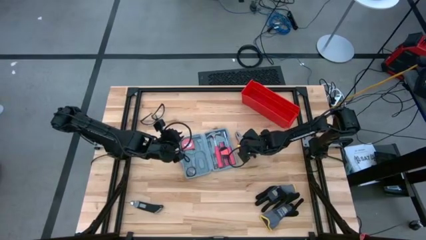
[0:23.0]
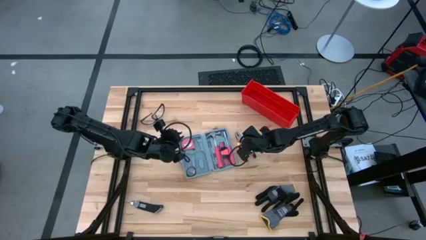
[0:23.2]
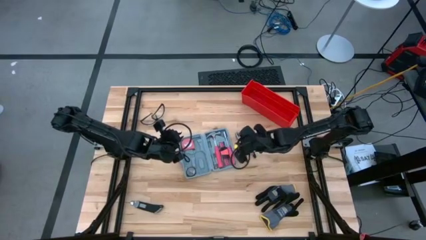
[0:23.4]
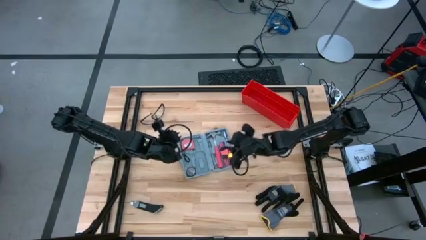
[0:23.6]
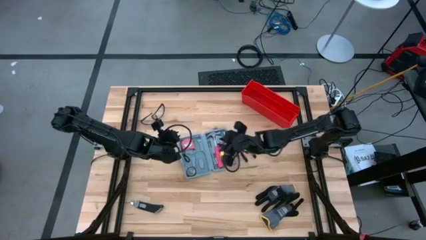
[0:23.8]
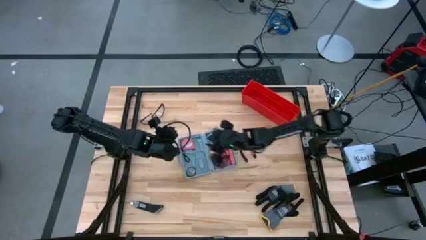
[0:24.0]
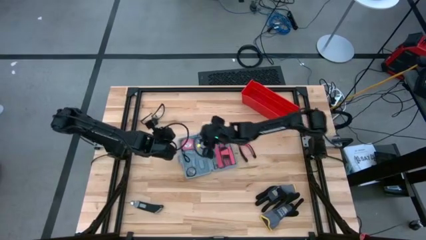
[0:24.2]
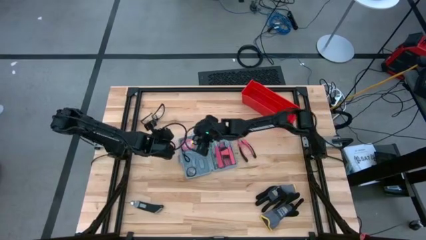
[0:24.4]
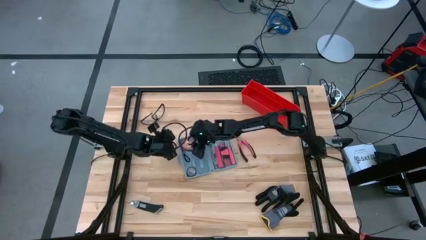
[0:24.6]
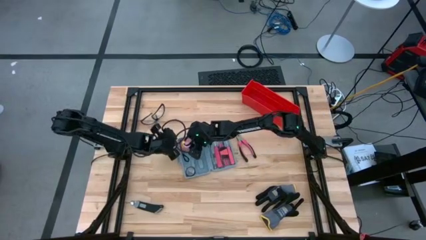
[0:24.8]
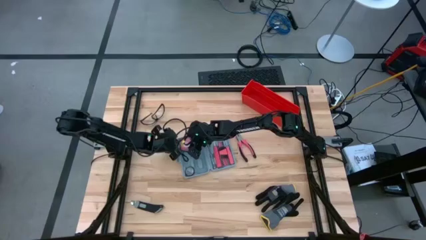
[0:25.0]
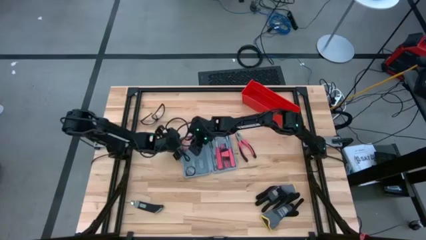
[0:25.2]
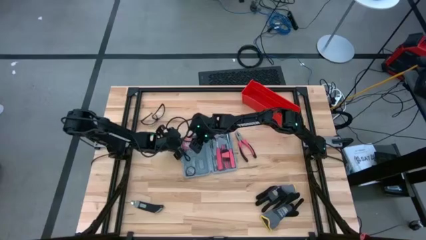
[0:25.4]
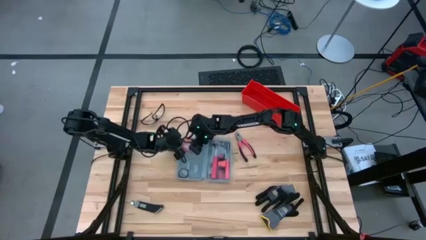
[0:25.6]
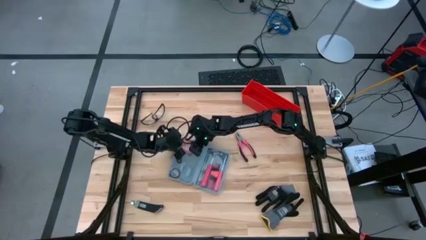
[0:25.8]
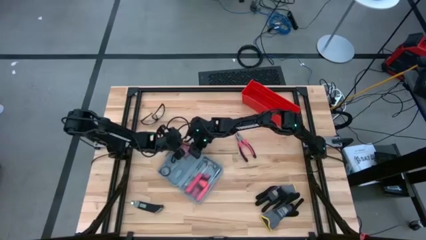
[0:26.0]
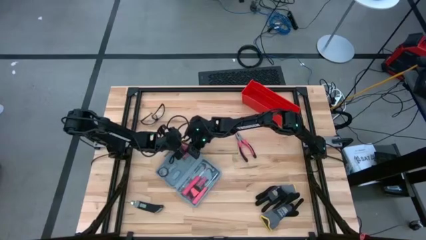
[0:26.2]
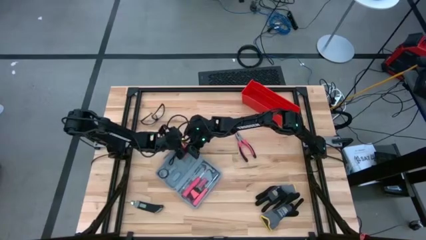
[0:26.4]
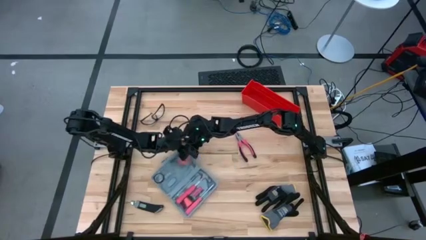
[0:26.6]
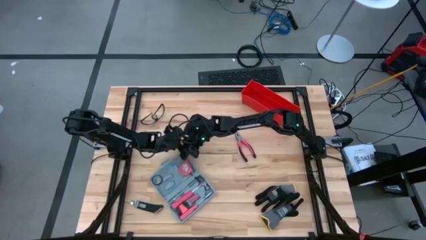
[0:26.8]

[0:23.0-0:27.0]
Task: prefit tool cases
Remove the tape measure from the toolbox

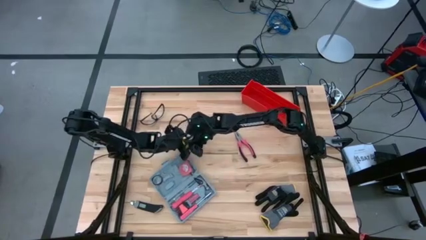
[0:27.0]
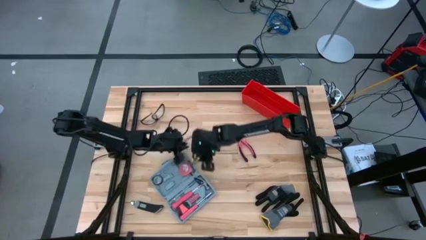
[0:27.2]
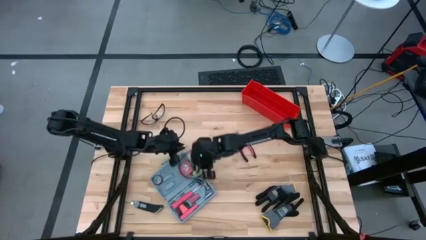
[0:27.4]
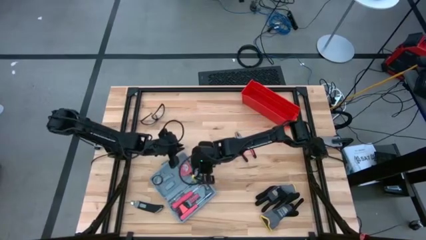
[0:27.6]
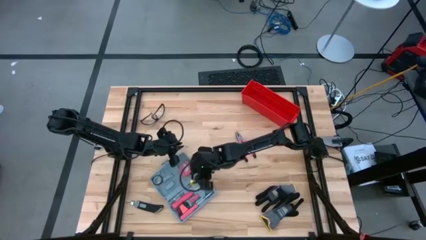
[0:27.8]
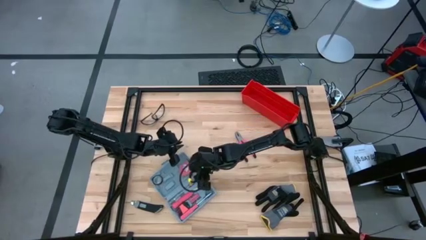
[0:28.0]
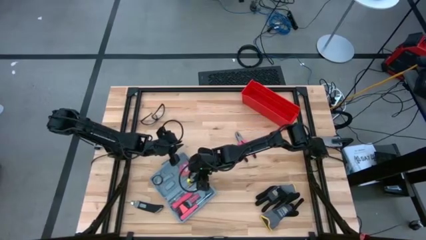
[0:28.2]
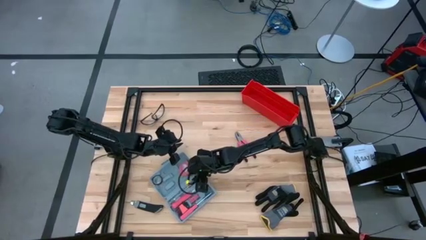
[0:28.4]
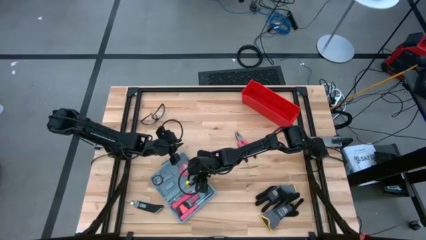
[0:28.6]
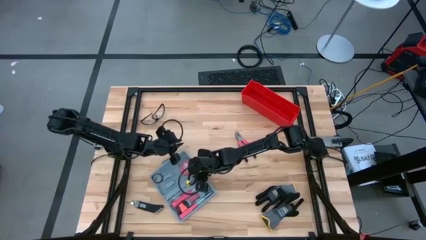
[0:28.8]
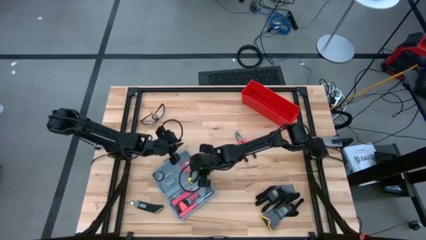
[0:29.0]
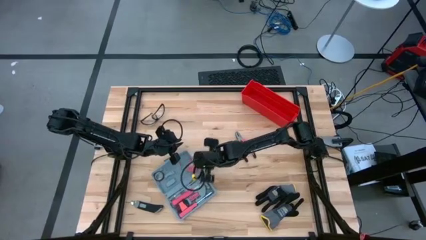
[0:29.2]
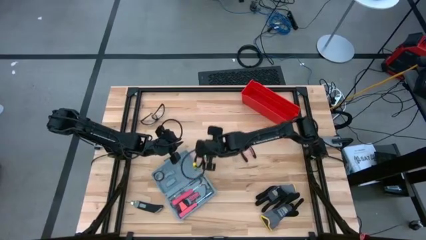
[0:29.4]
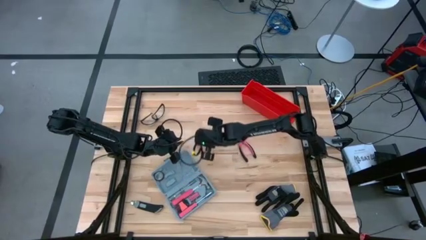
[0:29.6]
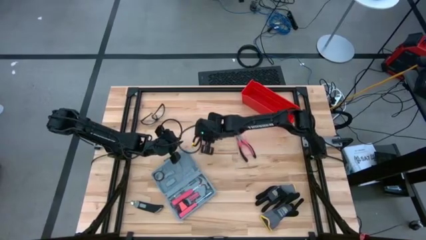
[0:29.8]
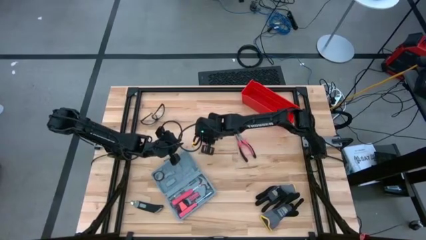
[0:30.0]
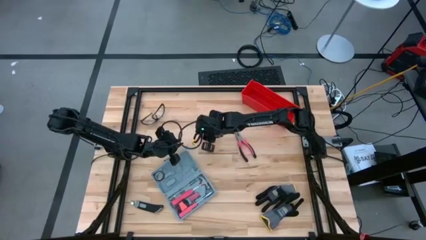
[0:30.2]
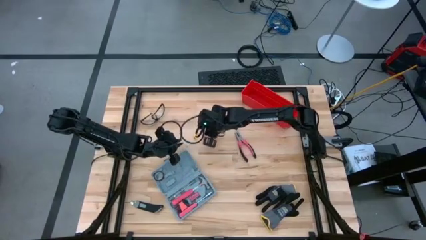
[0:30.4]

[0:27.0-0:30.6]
Remove the tape measure from the toolbox

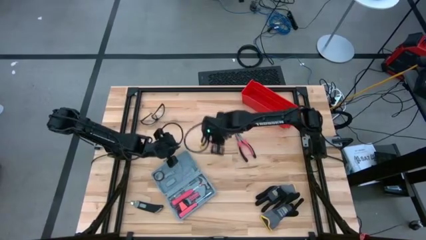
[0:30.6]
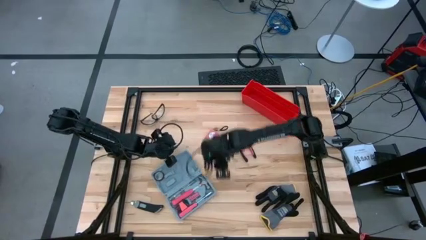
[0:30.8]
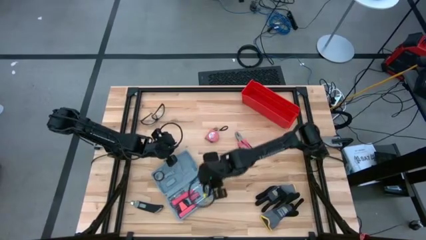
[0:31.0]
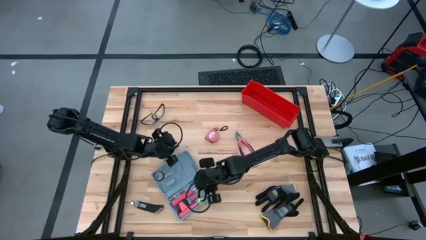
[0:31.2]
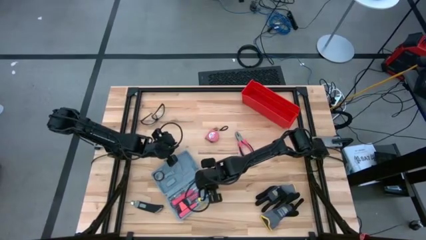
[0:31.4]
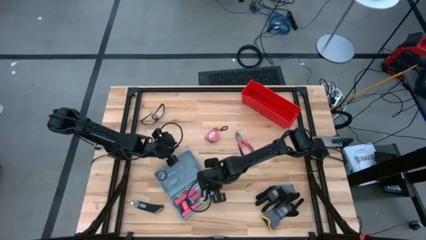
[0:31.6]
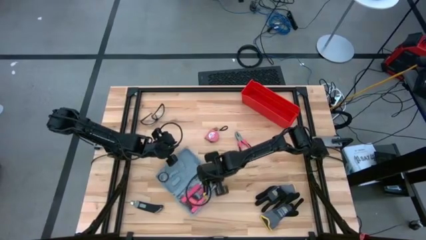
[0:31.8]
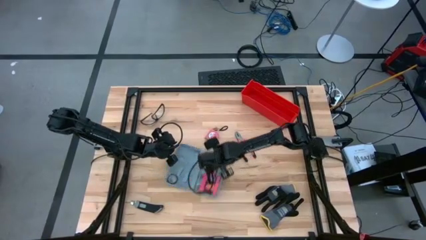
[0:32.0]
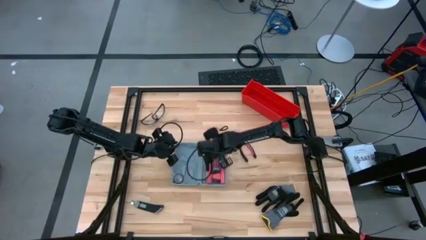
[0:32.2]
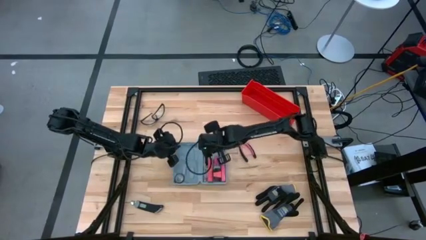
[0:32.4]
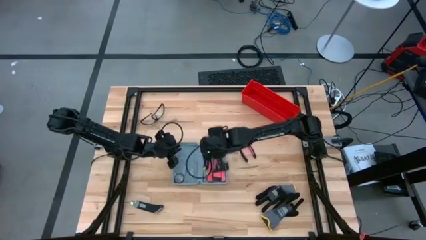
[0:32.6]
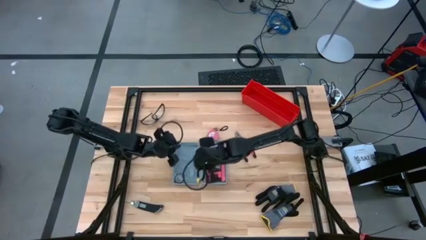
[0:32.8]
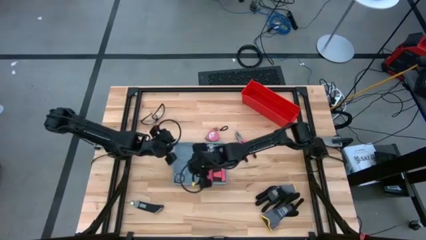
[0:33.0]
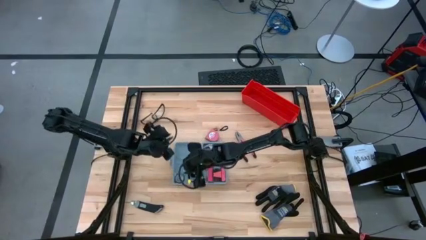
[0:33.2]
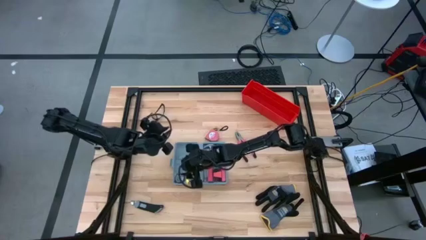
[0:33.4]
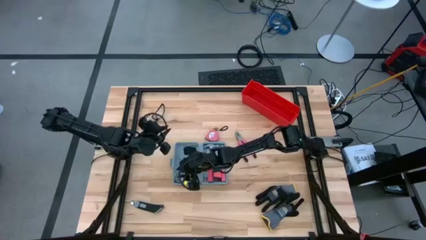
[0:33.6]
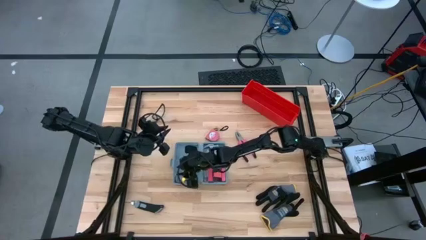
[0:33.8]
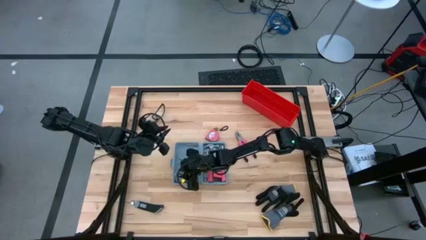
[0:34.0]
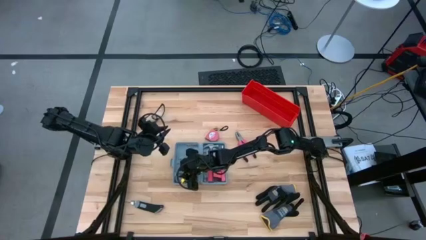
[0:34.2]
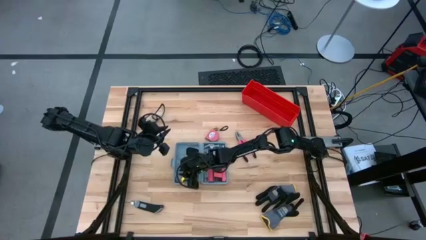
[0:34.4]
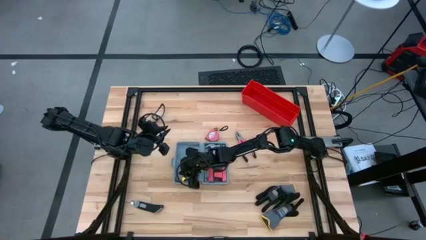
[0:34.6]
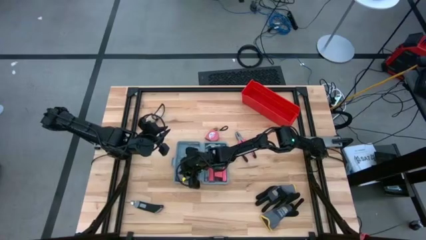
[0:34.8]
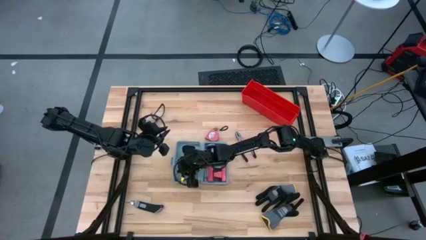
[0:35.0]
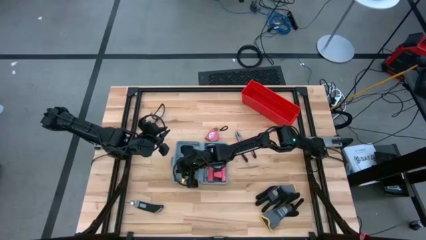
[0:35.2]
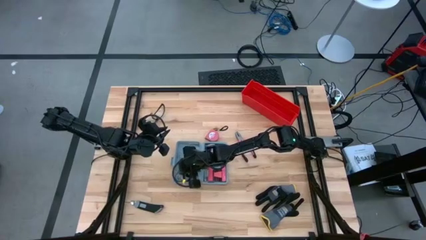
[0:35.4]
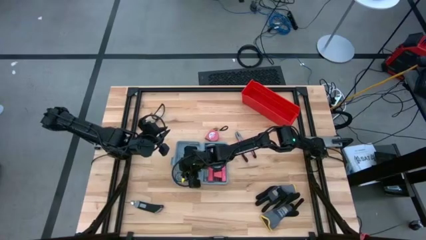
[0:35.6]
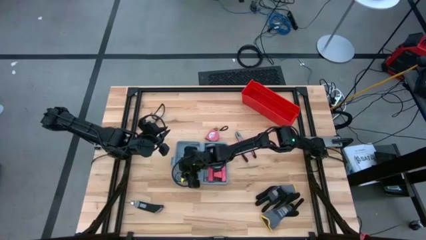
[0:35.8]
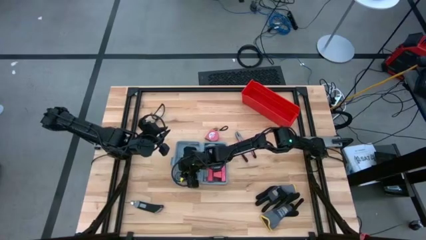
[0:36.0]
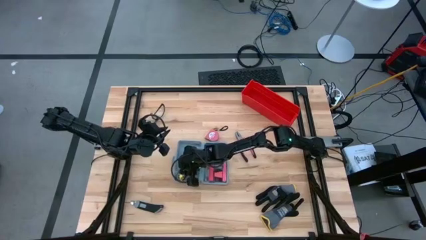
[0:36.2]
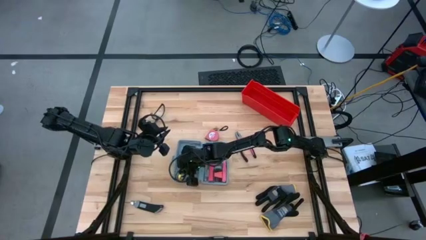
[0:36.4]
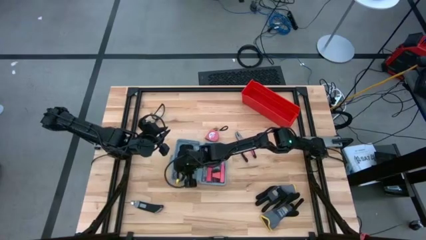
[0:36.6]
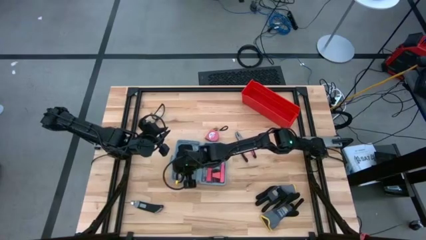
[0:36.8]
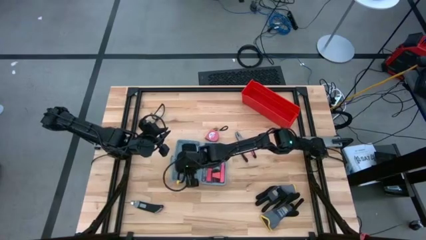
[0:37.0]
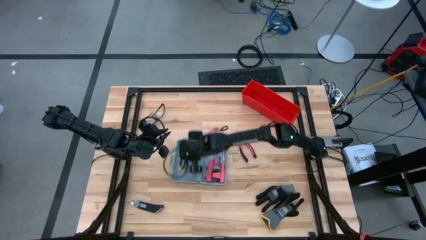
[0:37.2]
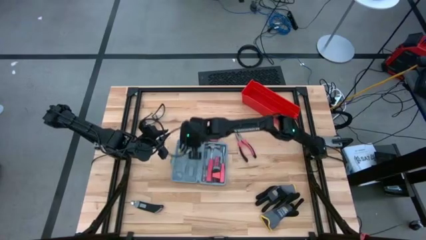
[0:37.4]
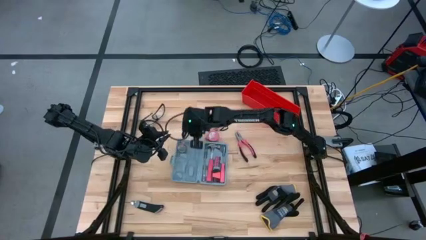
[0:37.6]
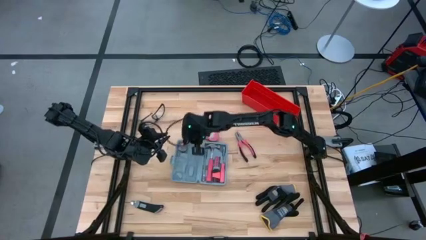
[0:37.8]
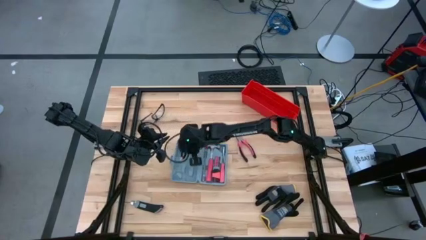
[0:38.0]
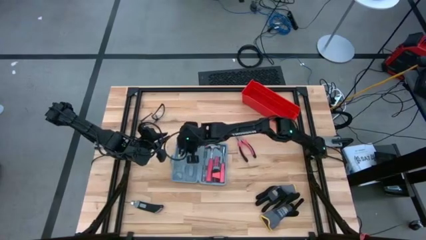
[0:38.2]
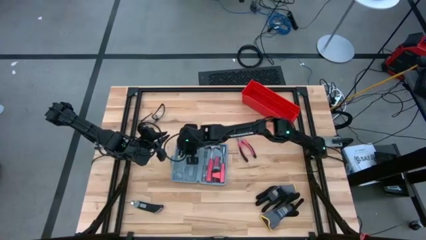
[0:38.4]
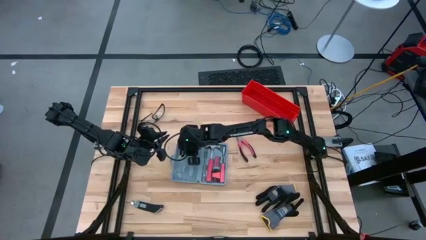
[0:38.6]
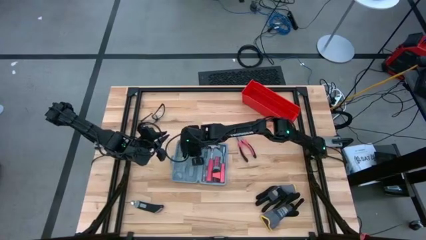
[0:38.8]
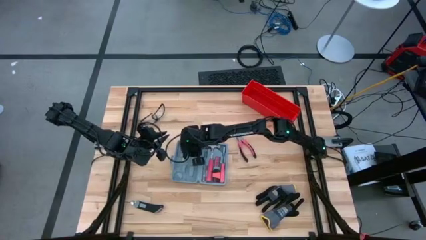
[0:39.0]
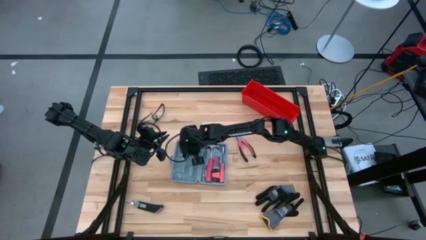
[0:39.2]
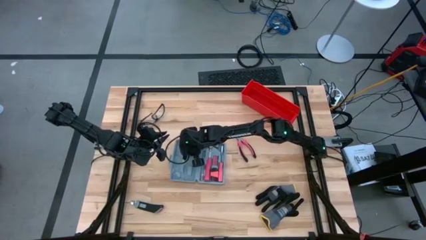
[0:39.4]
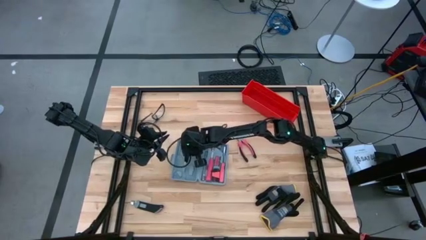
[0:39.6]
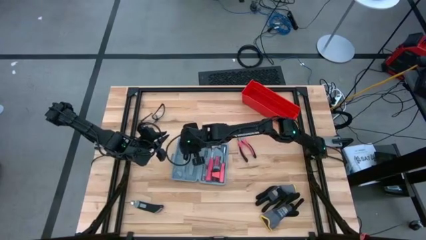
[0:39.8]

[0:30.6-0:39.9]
Remove the electrical tape from the toolbox

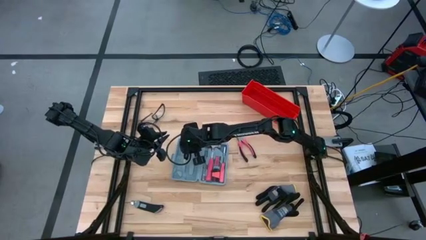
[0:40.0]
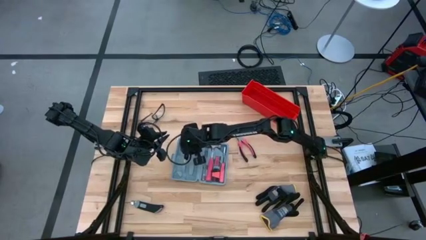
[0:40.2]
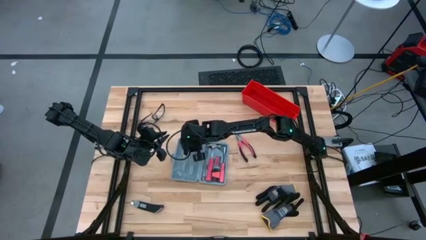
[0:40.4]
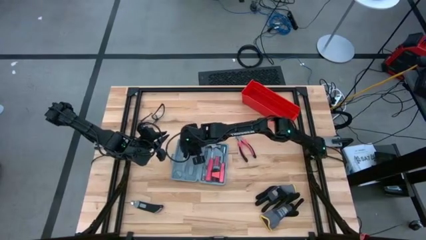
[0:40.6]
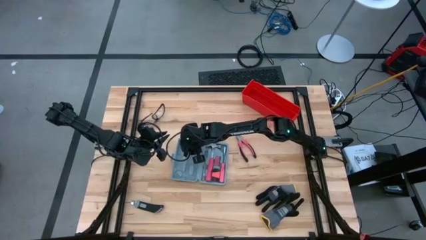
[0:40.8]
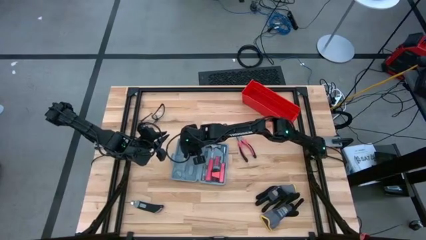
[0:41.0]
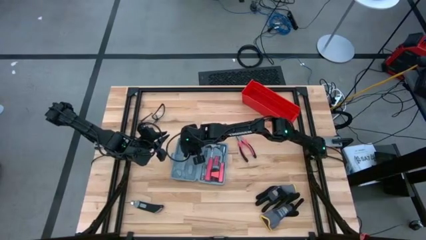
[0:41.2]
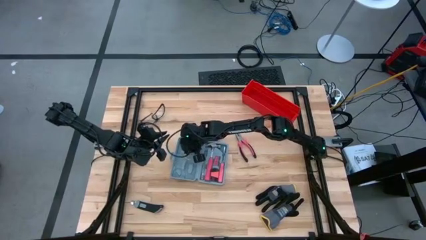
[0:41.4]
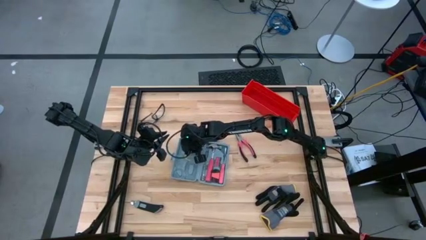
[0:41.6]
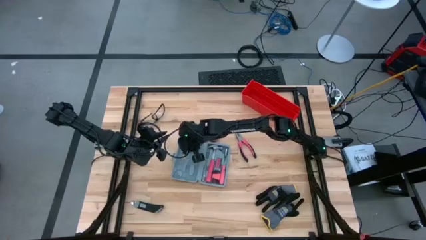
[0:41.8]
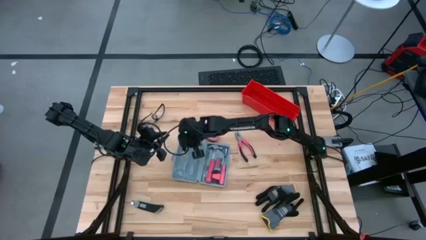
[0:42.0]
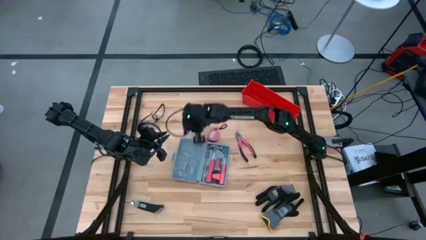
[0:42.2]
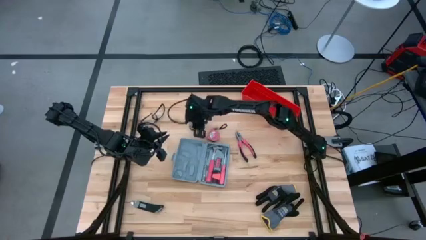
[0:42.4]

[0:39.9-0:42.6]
Remove the electrical tape from the toolbox
